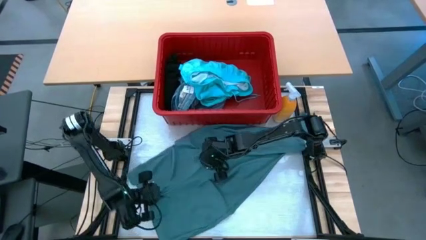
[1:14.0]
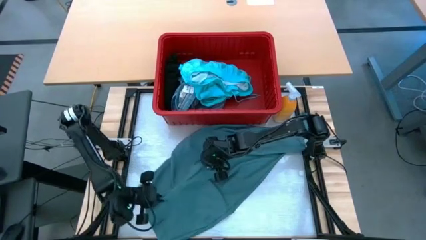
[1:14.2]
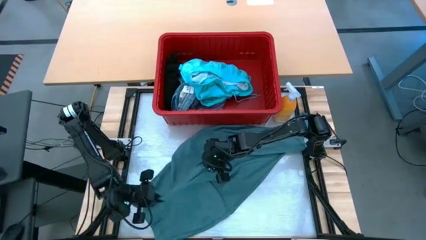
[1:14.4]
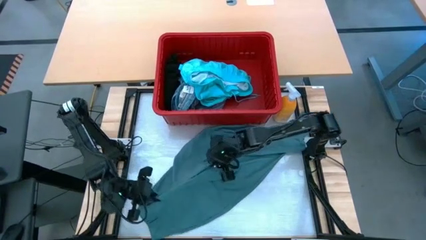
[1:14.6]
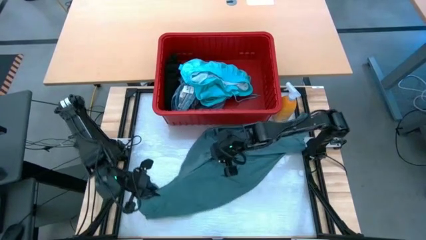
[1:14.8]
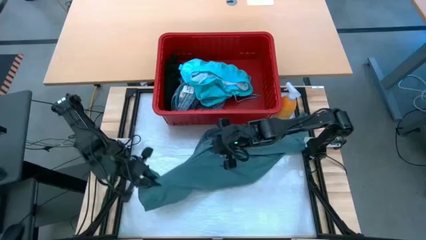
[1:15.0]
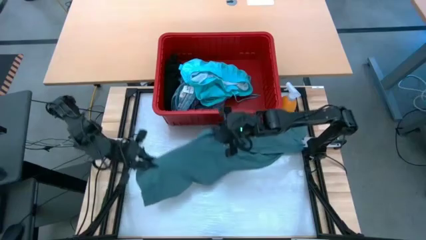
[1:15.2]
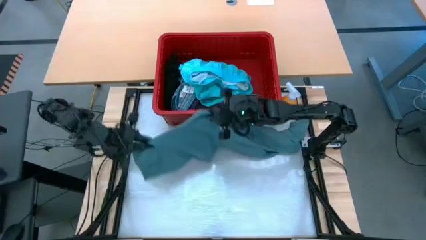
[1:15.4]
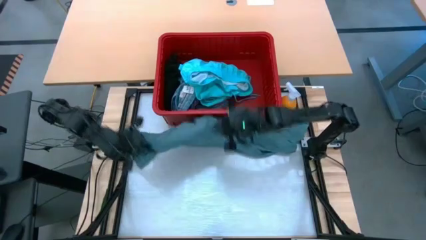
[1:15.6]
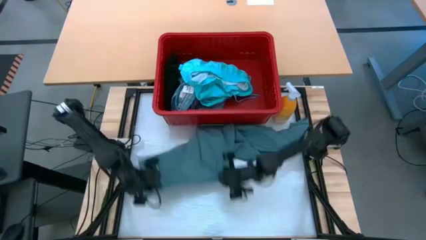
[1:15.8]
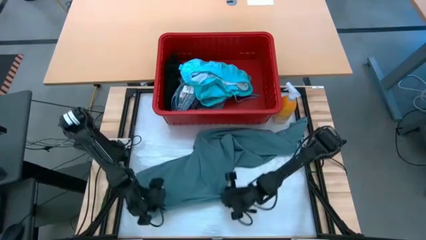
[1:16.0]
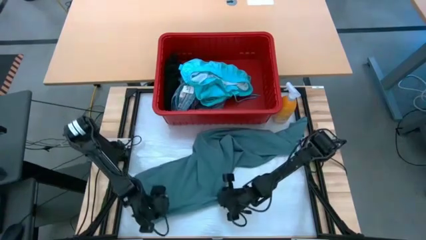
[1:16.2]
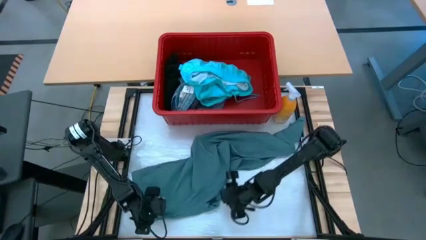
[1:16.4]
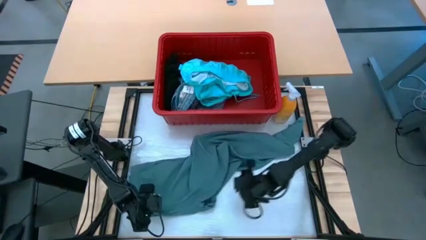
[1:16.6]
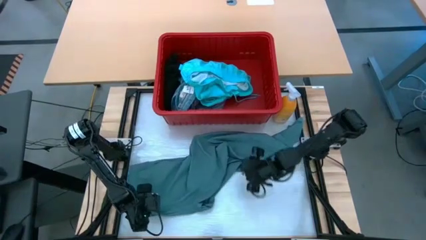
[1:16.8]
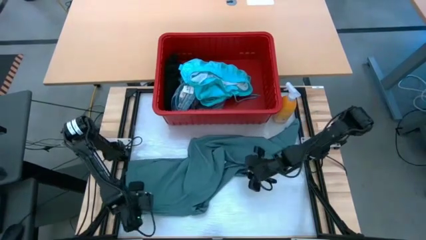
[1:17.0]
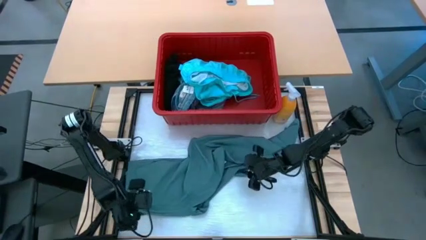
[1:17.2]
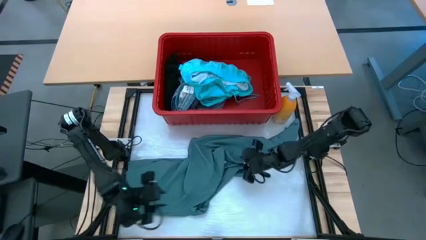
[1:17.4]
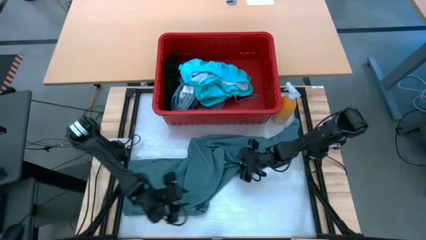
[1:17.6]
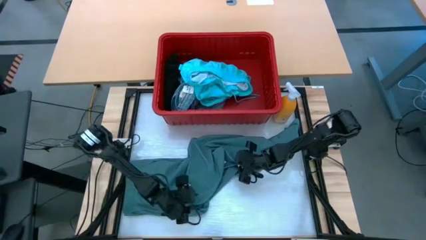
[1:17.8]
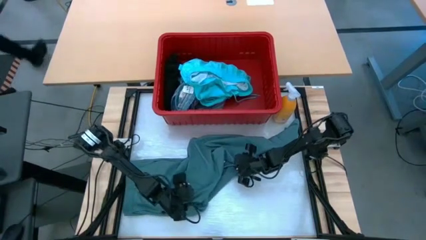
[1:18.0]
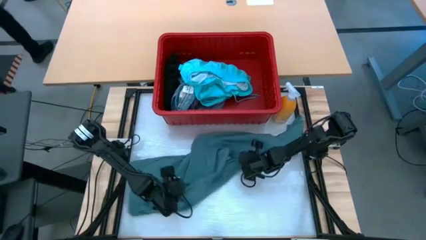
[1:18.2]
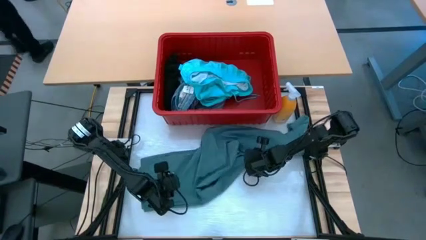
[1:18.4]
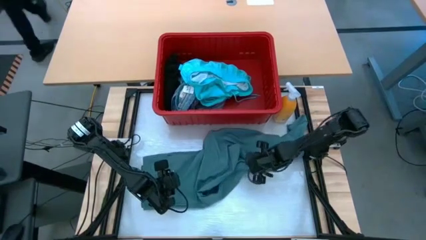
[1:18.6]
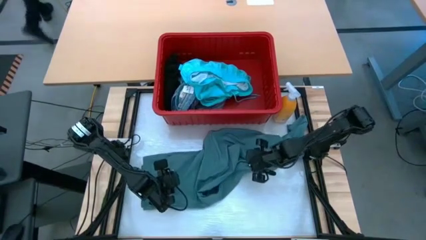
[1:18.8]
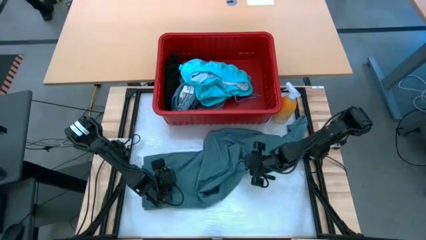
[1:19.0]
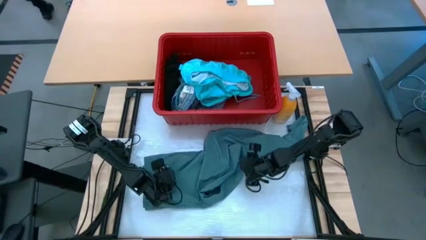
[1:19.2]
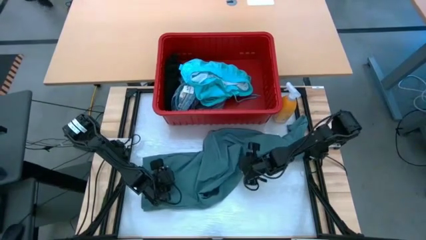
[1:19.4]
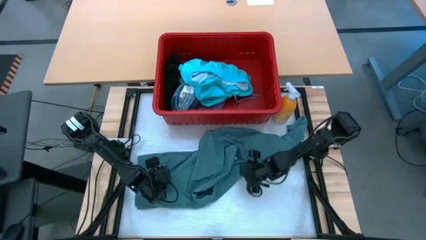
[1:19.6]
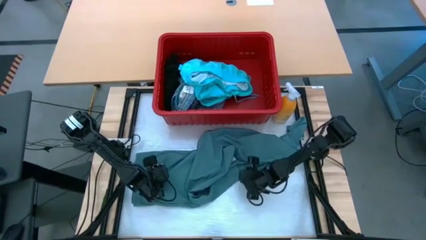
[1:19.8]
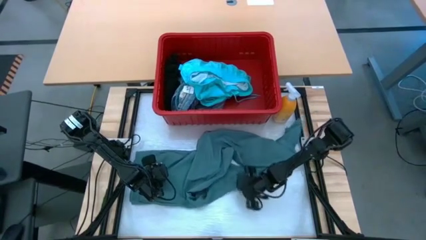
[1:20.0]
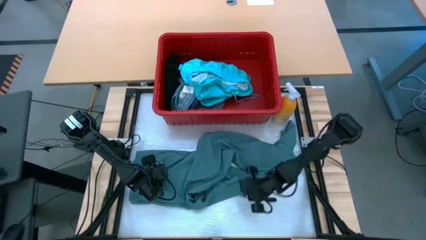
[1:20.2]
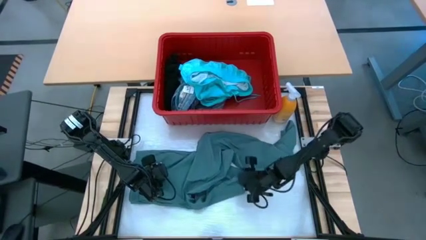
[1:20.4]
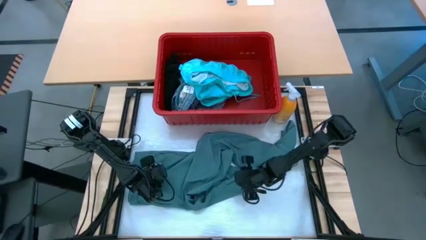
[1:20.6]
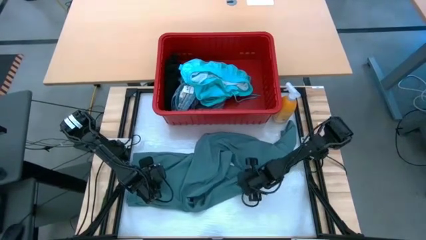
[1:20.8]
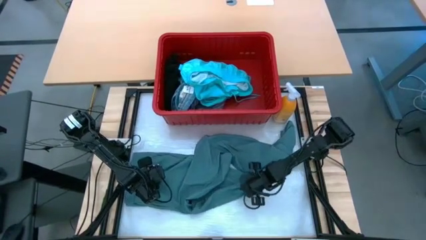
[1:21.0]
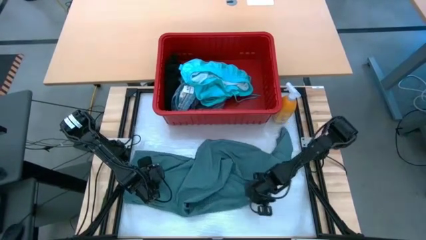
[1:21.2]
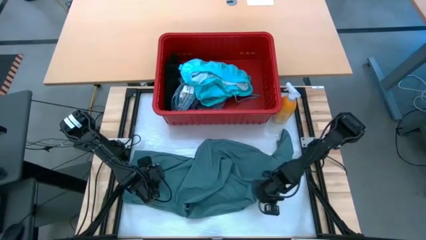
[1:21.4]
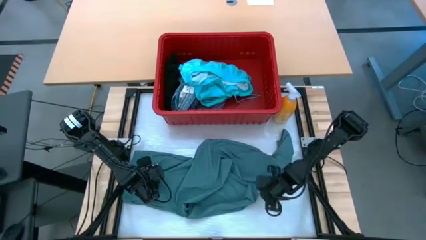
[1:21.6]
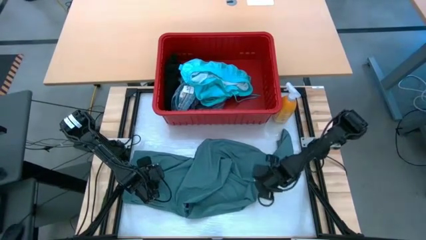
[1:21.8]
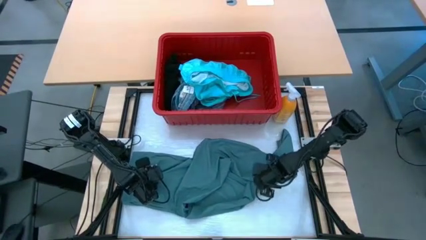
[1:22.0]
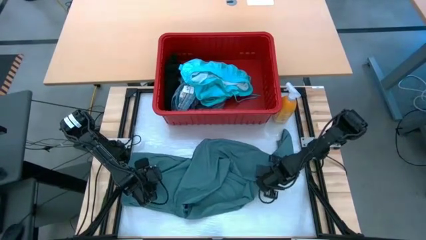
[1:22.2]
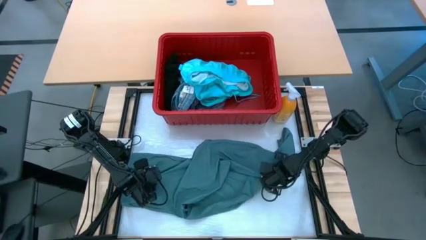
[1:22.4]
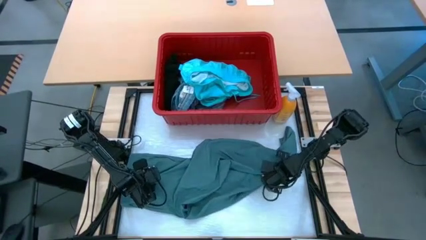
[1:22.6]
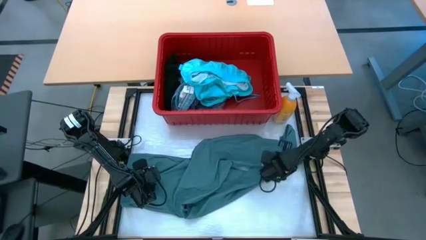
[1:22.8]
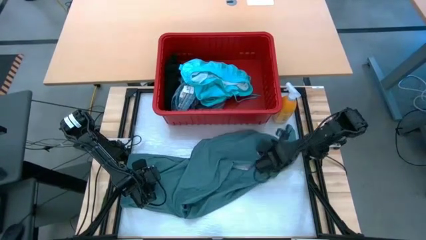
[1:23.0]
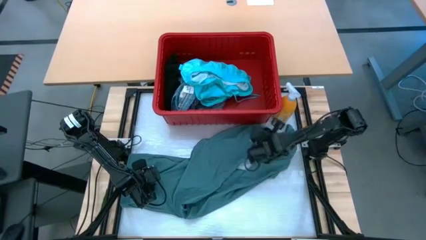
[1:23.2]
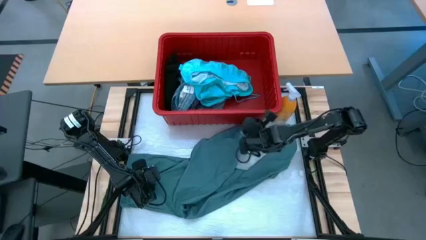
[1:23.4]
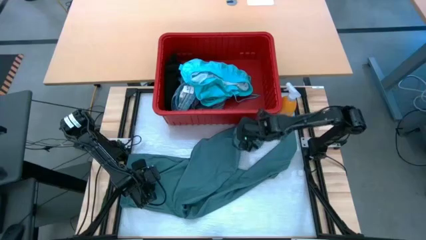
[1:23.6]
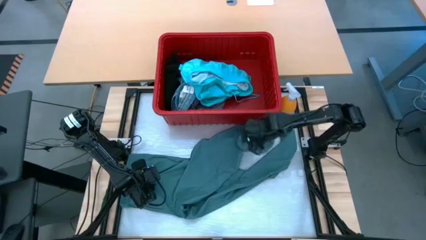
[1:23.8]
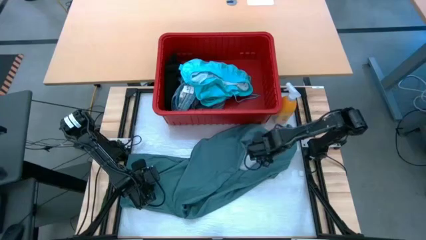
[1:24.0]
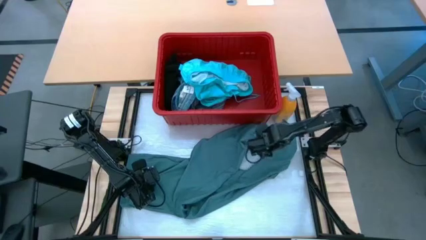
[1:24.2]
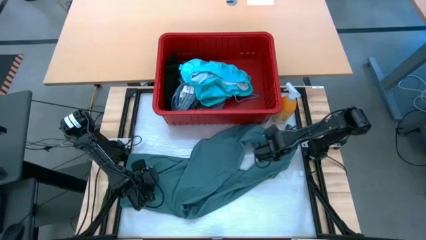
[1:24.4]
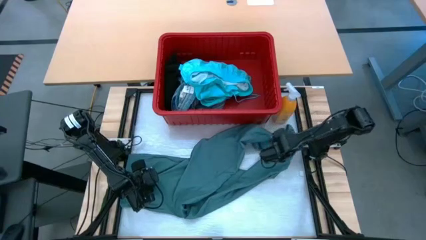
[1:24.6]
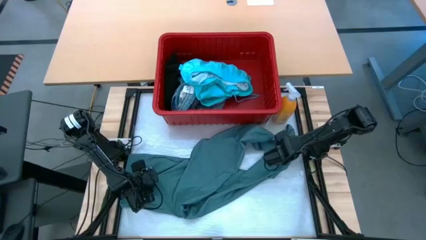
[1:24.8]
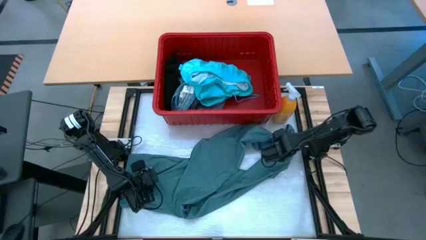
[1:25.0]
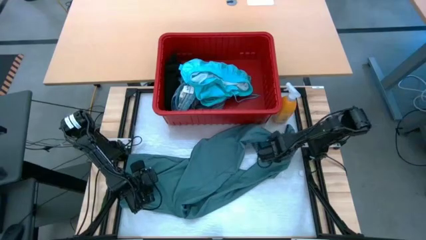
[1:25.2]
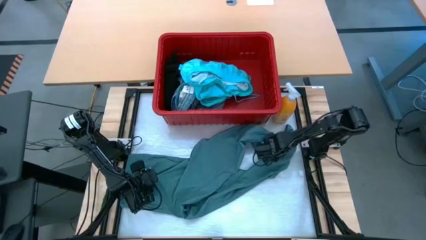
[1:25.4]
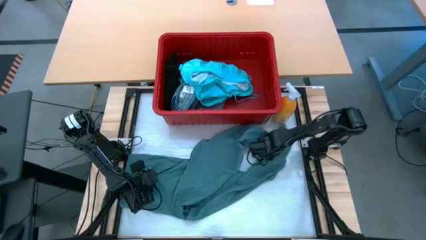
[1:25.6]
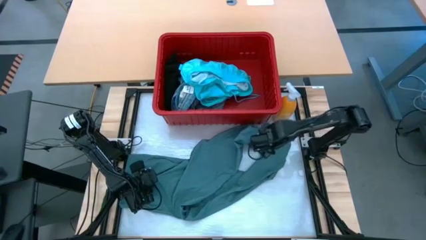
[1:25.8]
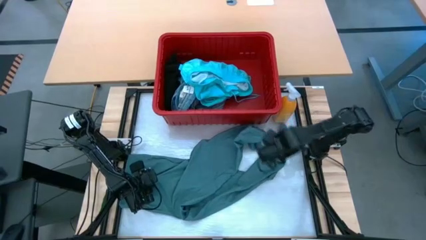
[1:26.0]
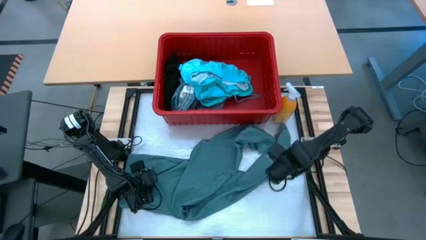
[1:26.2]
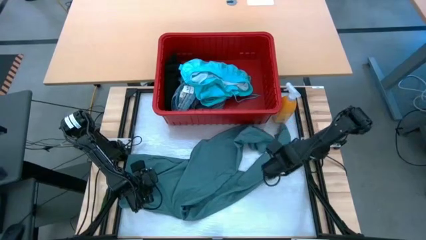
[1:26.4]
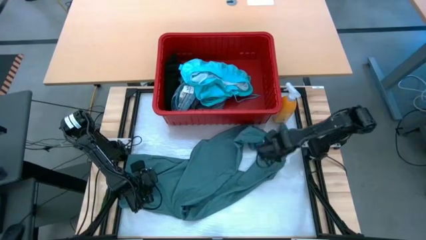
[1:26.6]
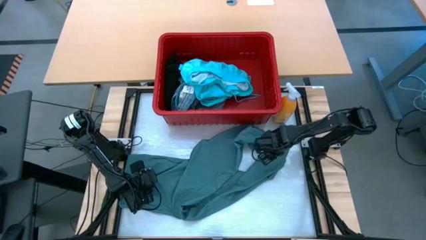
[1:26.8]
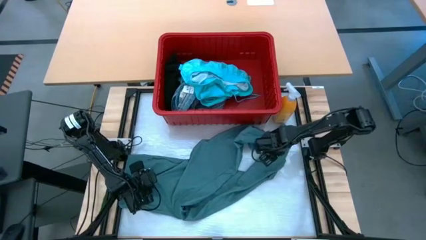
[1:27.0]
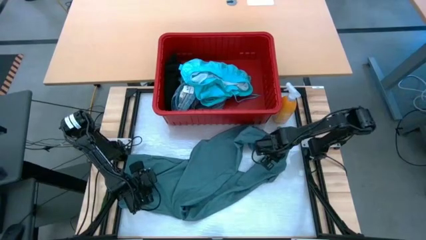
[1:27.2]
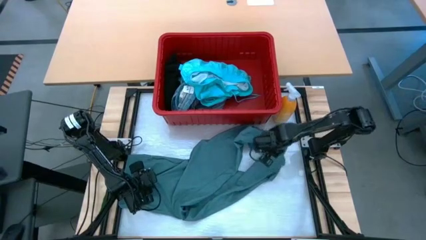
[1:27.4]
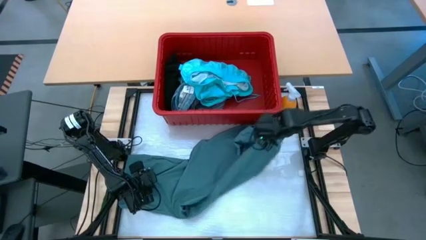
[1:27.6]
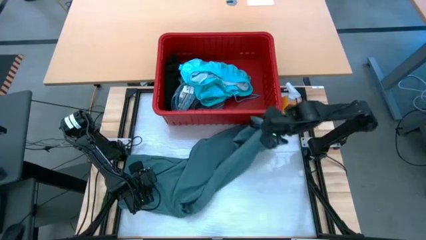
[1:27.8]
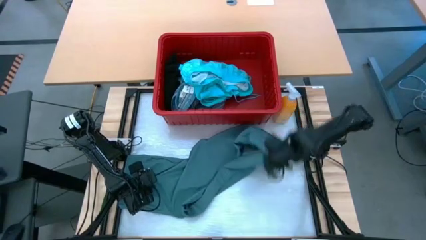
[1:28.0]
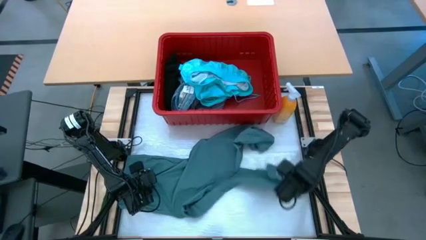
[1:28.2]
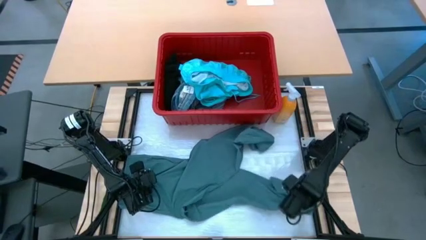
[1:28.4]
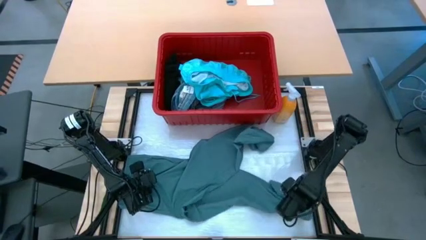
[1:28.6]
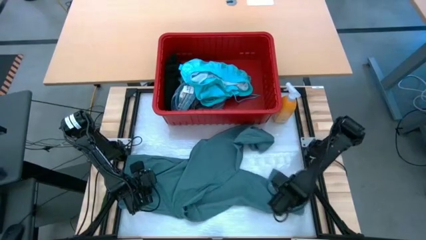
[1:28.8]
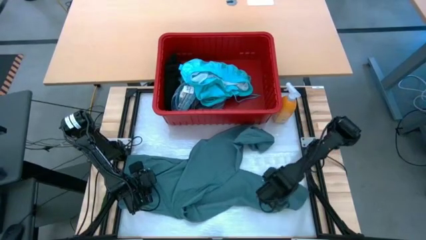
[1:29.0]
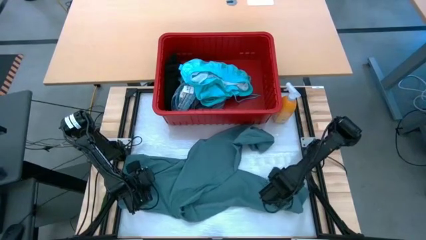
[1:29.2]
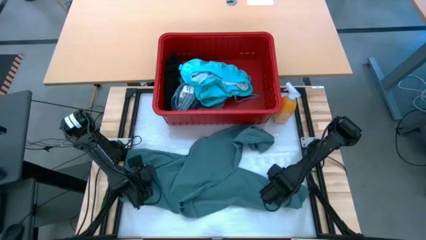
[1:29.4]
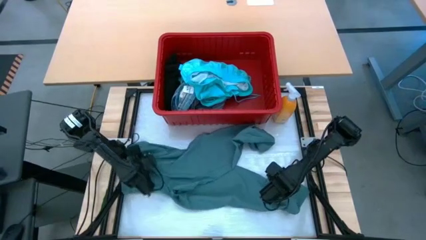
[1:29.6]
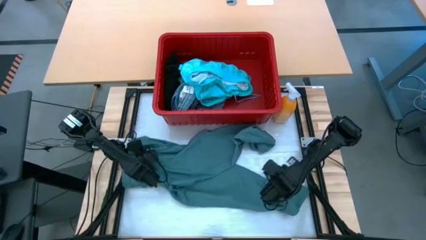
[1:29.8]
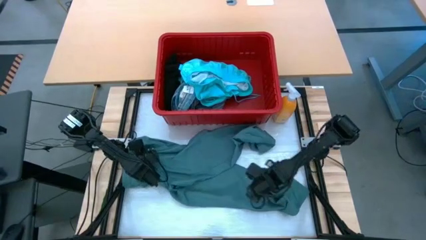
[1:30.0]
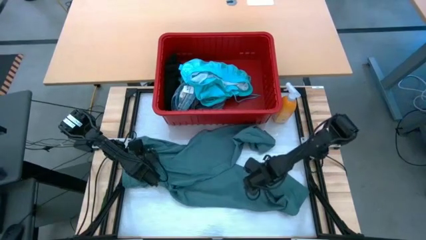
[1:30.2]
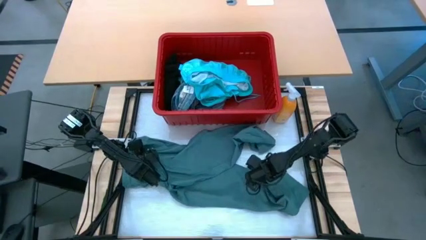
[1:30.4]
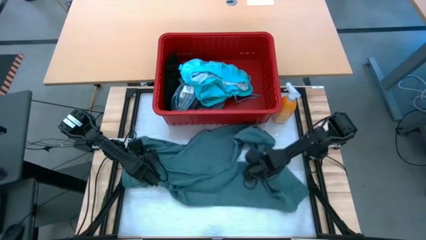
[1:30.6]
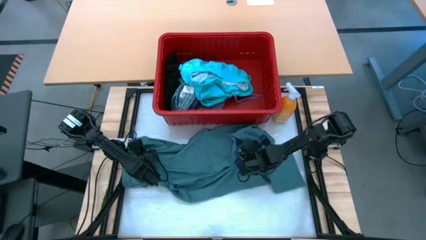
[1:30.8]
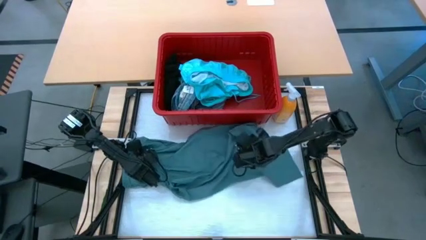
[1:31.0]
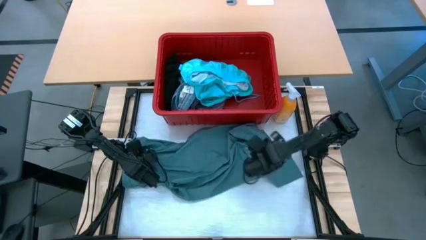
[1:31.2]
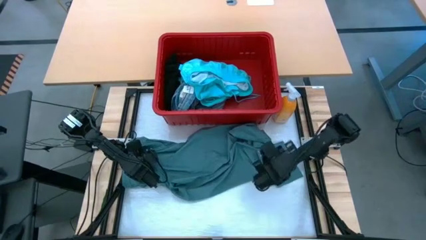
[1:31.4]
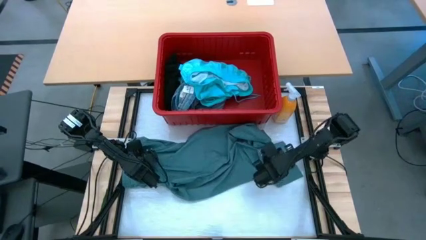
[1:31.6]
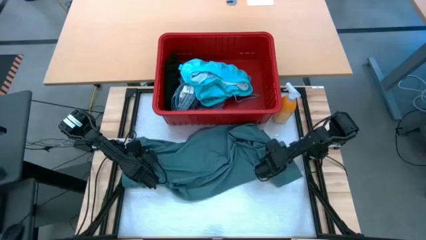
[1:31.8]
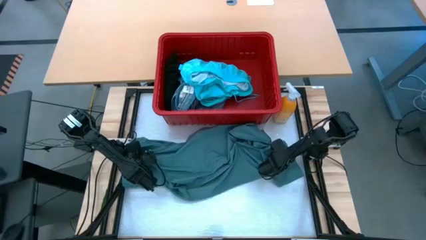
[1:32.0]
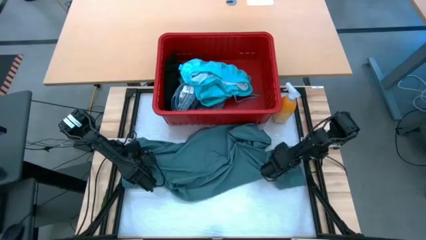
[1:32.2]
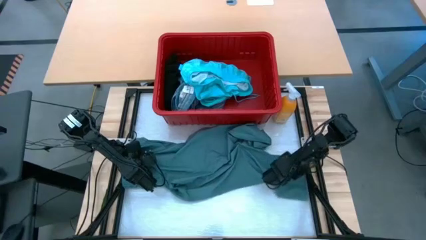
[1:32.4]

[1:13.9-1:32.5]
Task: Fold Laundry from Bin
Fold the light blue pants
